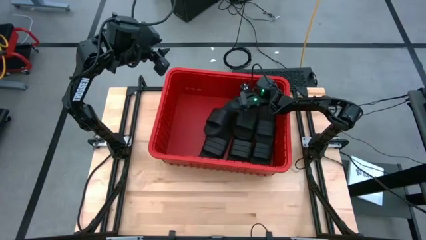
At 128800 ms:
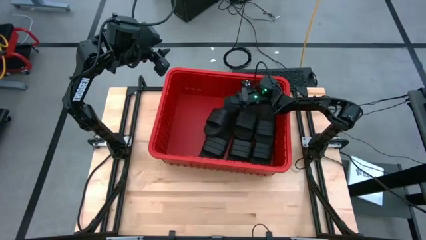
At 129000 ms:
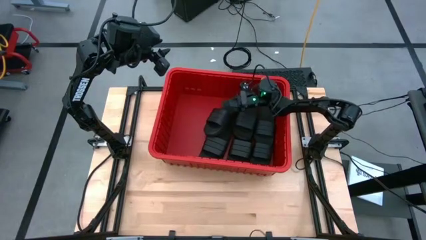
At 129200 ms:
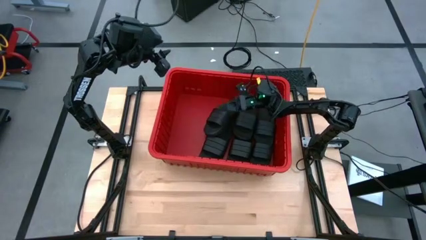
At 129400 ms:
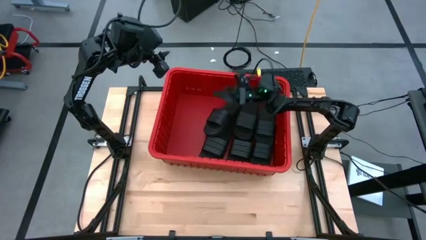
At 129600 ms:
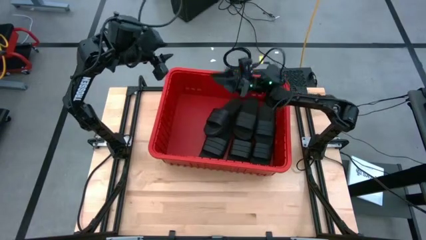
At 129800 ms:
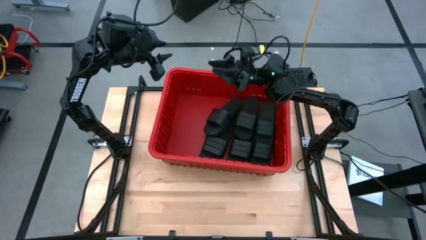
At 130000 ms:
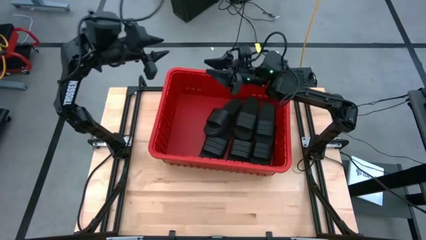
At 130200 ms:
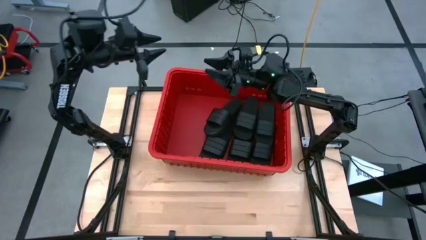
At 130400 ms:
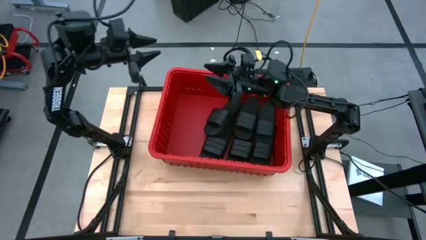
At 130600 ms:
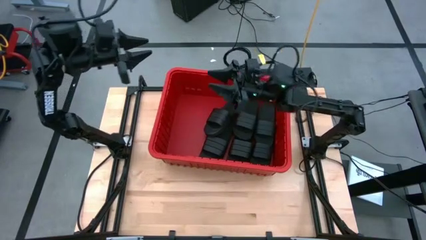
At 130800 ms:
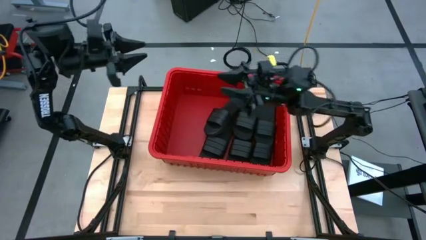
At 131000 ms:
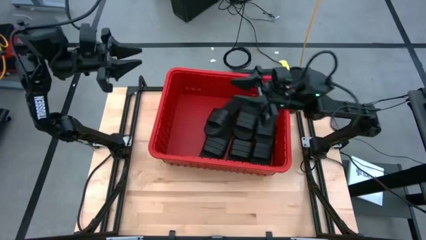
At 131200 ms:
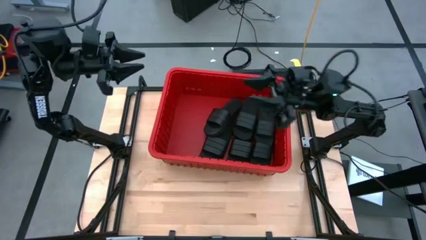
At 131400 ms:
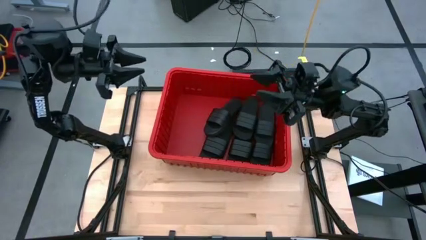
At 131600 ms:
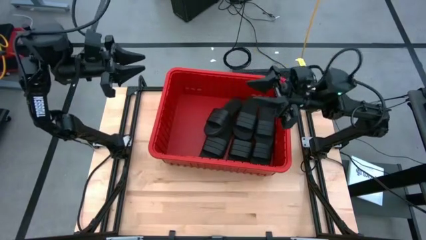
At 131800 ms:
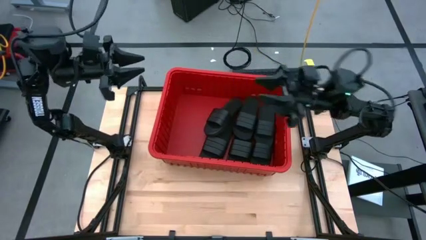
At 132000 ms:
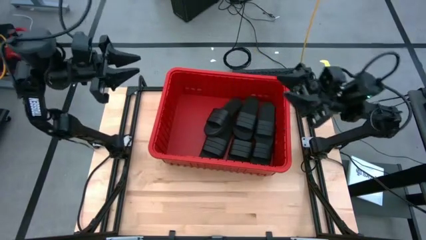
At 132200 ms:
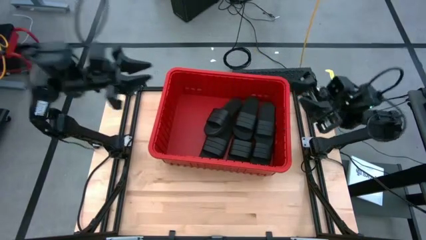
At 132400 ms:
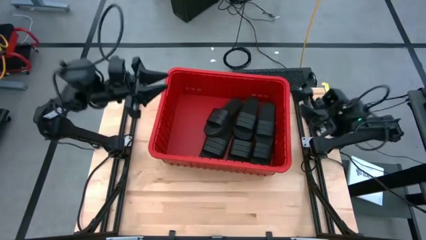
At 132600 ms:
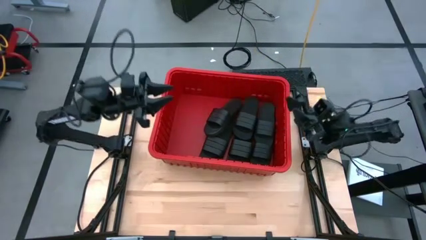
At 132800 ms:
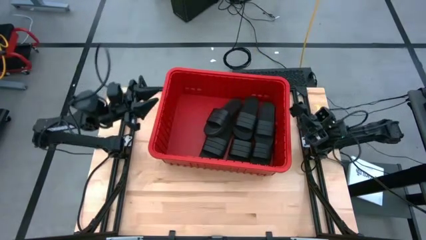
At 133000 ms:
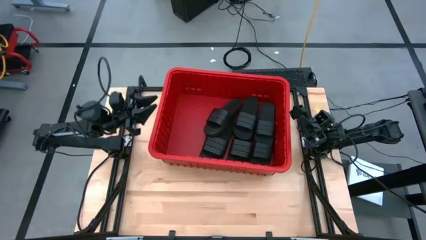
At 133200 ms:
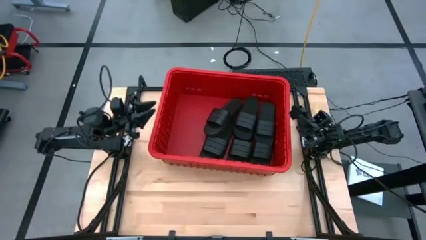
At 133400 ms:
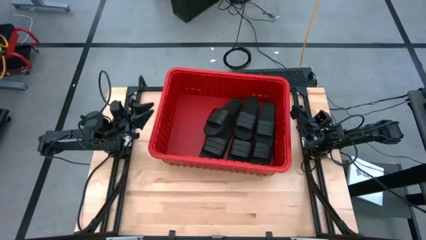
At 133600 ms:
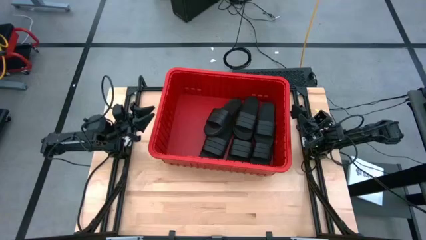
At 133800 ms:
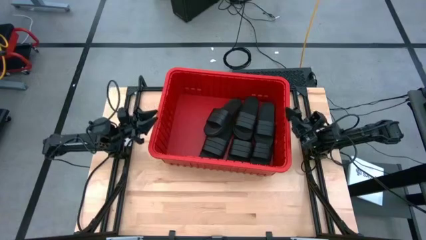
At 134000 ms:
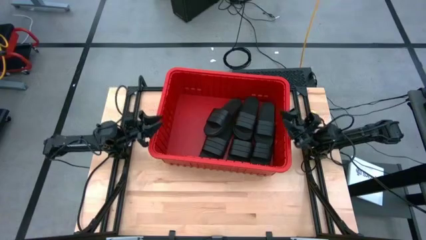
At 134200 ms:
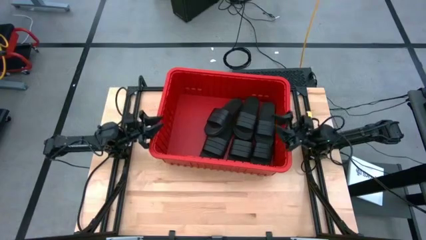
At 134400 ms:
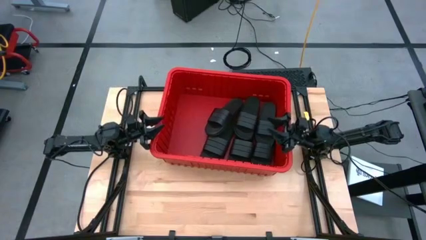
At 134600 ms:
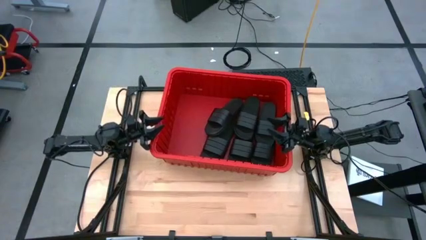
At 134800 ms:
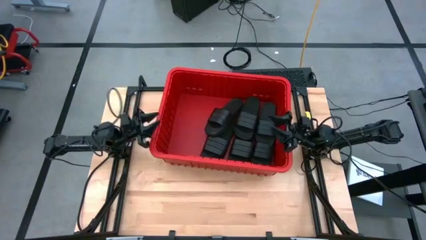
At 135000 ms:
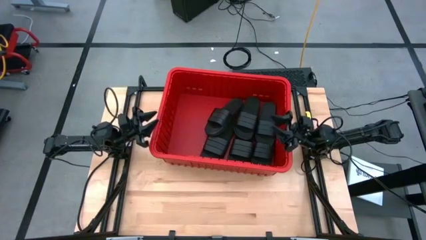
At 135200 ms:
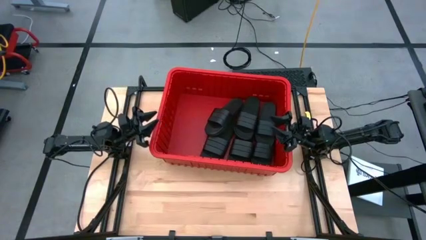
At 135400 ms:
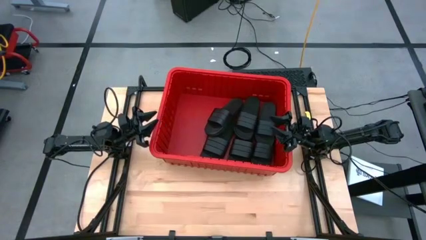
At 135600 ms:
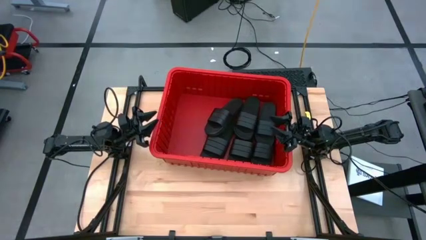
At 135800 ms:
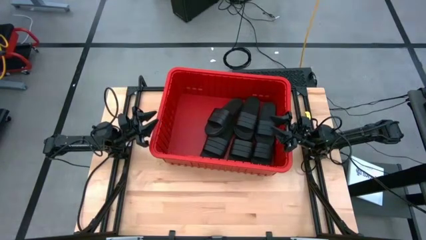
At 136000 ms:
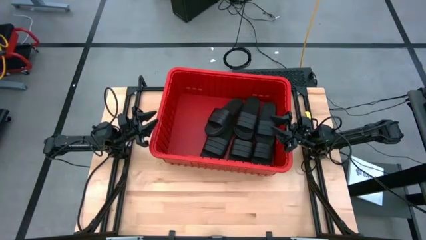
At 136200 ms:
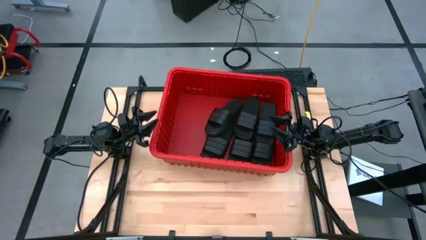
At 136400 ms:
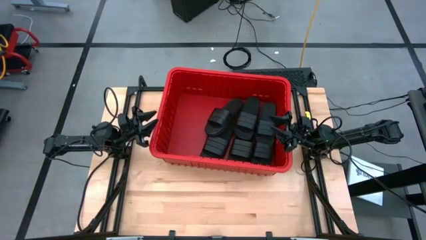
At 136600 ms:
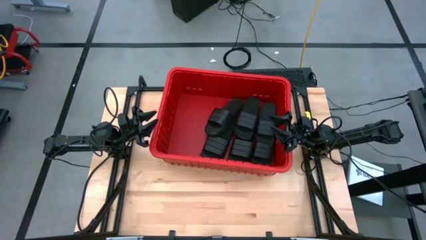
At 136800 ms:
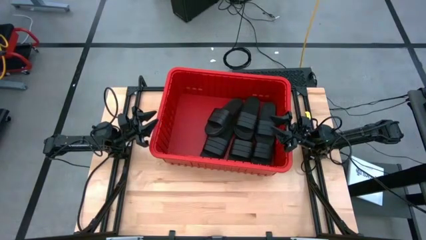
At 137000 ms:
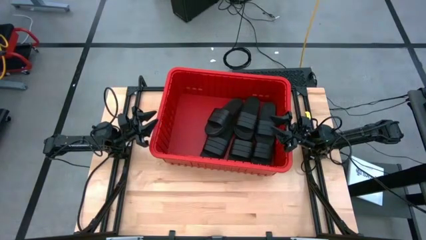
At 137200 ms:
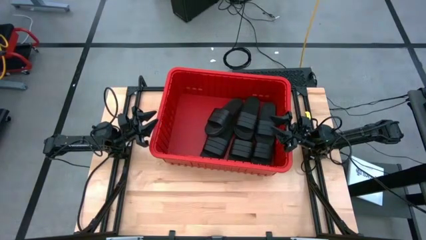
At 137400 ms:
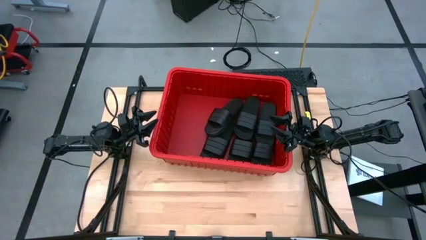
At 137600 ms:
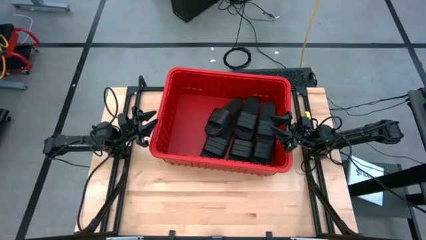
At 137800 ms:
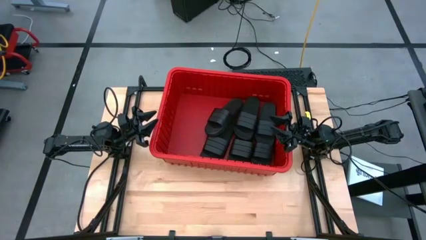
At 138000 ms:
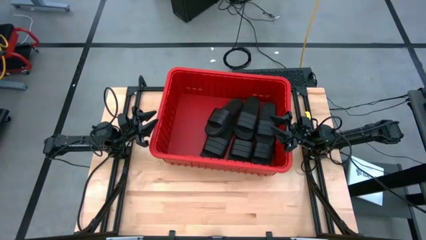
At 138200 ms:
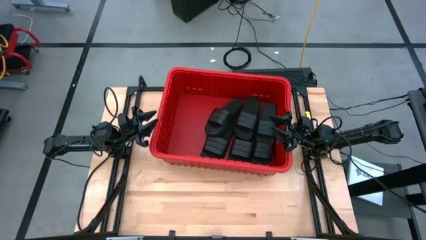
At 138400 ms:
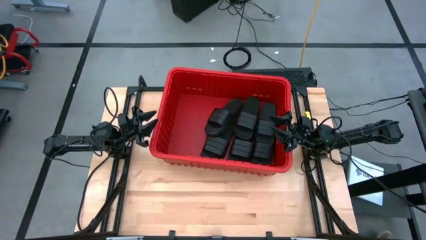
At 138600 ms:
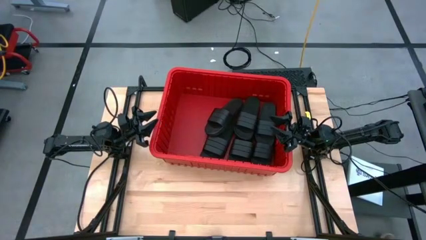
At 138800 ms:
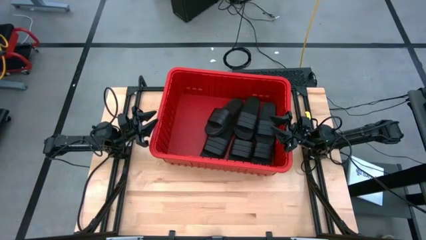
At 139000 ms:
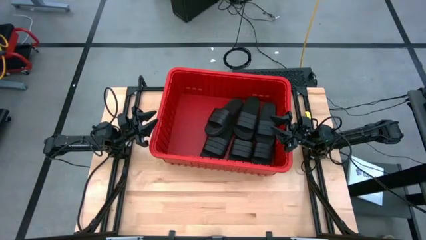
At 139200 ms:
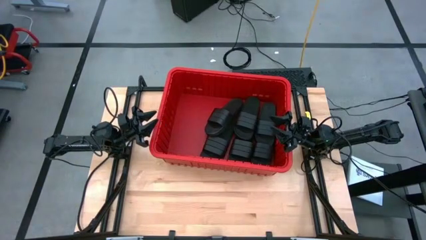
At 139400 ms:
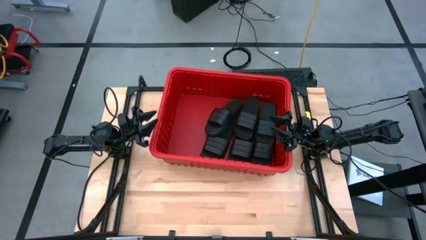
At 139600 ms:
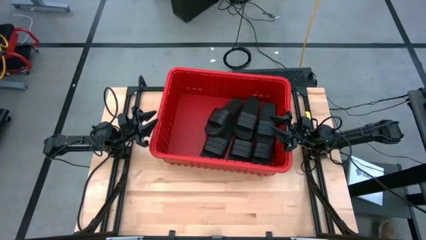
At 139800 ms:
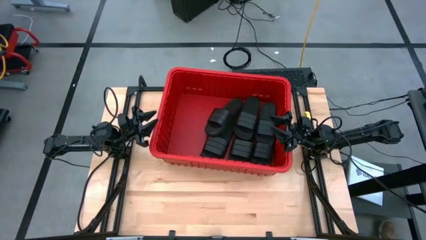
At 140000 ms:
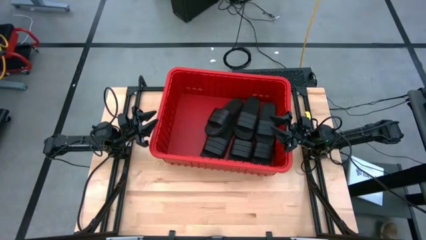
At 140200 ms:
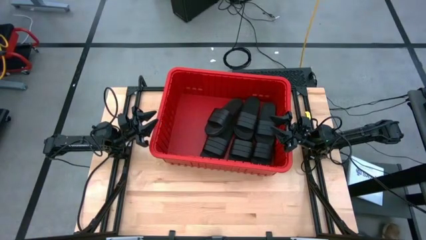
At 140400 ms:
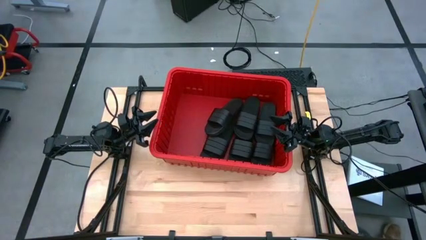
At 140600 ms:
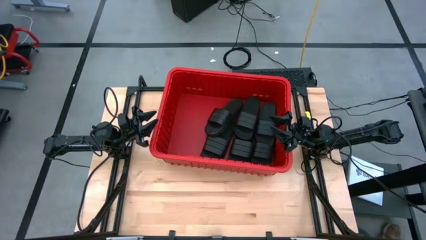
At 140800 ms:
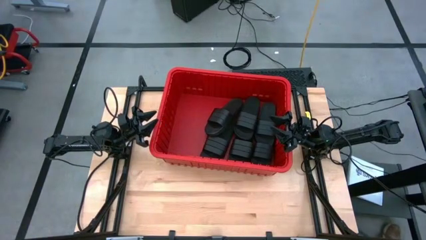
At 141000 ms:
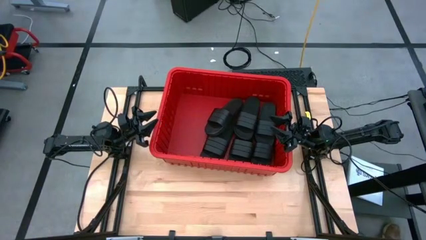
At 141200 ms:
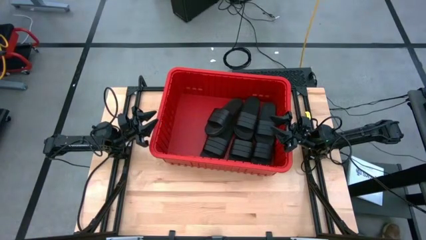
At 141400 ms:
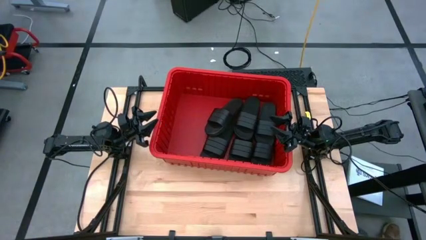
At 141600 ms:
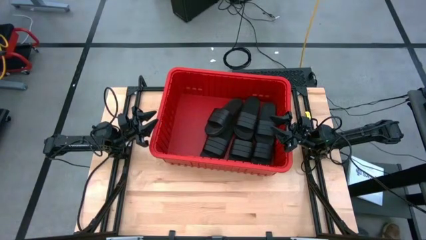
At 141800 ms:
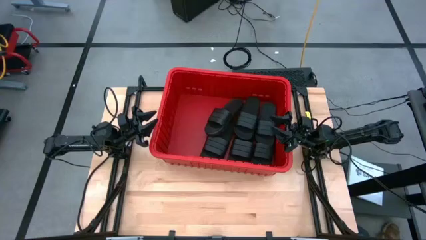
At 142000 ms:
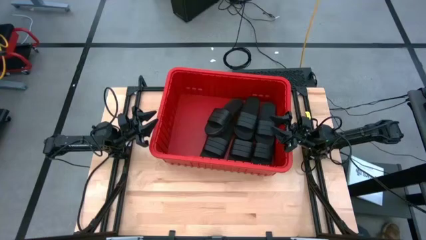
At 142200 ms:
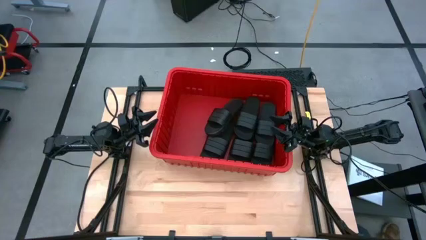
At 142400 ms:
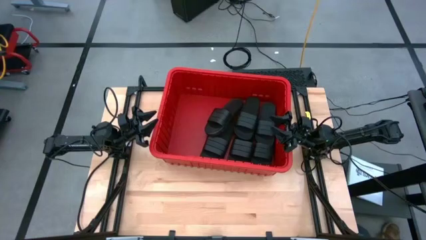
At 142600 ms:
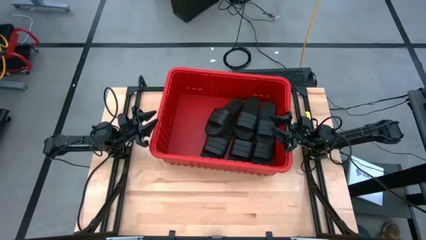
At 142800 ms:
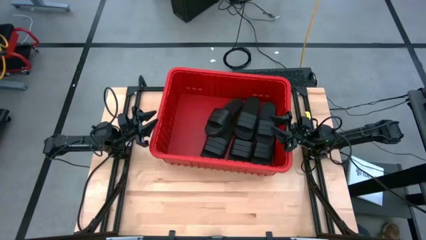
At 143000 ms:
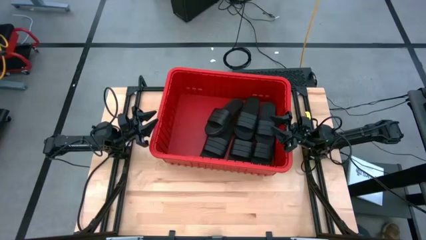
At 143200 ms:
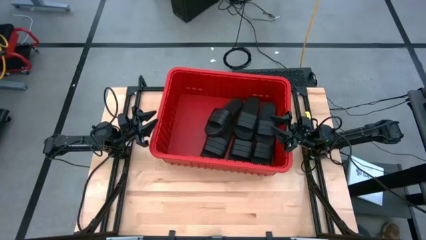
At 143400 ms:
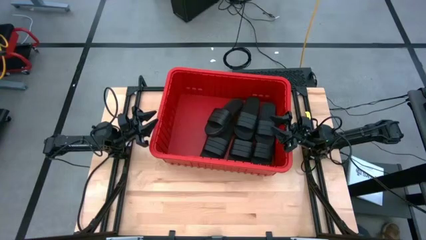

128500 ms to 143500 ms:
Task: Pick and place slides into bin
Return to Home Position

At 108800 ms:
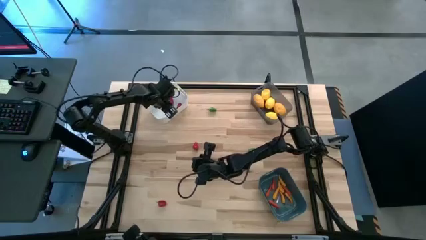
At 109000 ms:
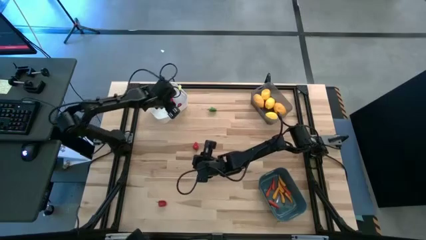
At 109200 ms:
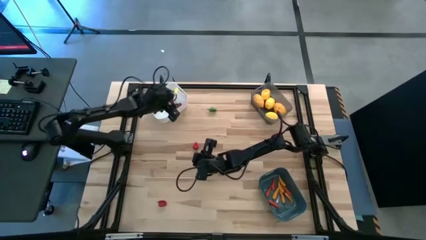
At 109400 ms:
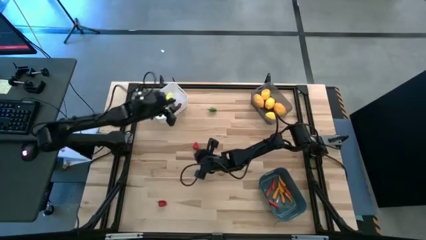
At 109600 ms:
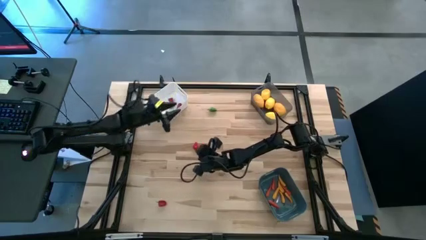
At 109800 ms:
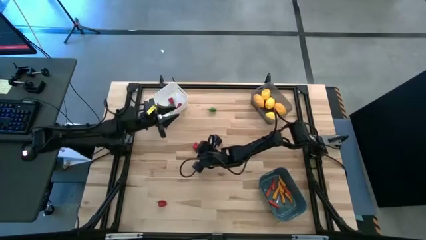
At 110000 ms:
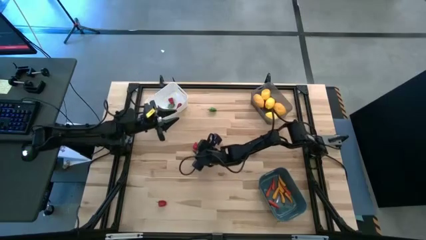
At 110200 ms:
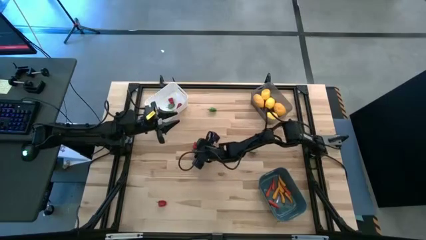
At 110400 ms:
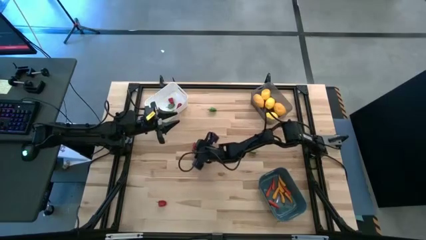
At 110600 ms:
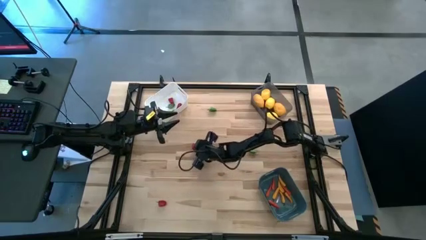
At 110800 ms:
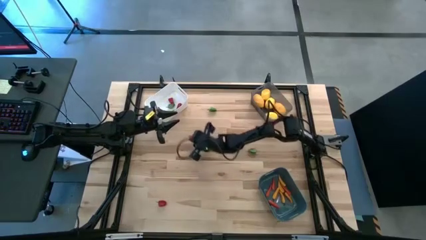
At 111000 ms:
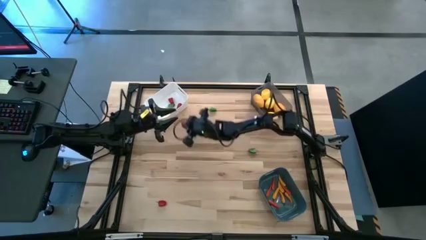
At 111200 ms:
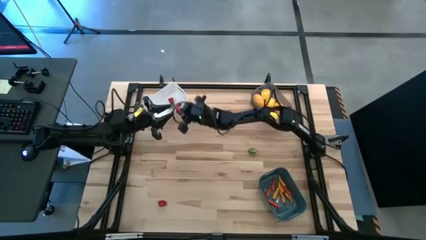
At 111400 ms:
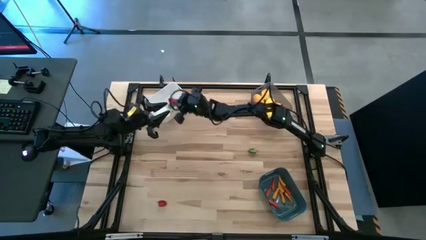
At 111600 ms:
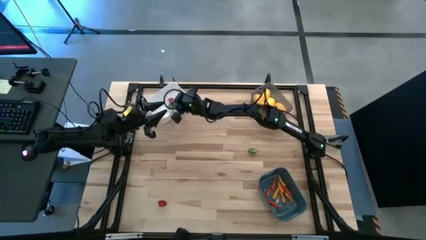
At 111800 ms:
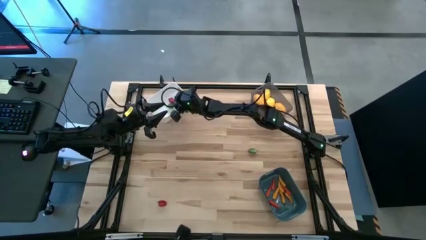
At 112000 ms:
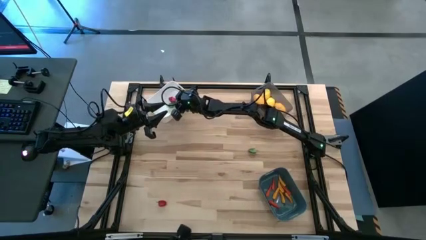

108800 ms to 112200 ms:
Task: Sort produce into baskets
Put the red chili pepper into the white bin
